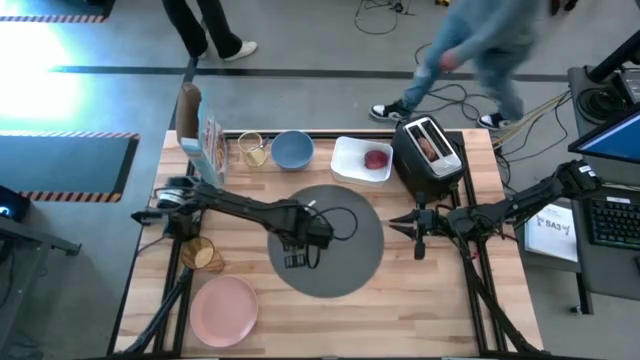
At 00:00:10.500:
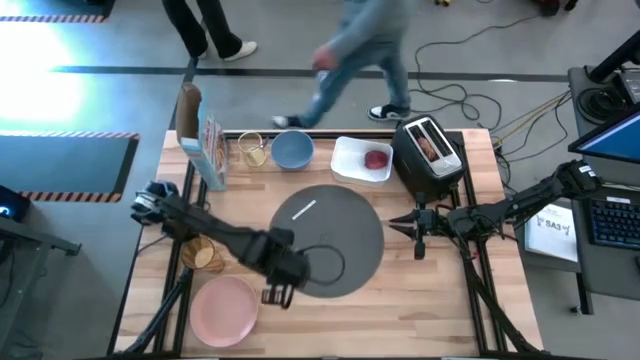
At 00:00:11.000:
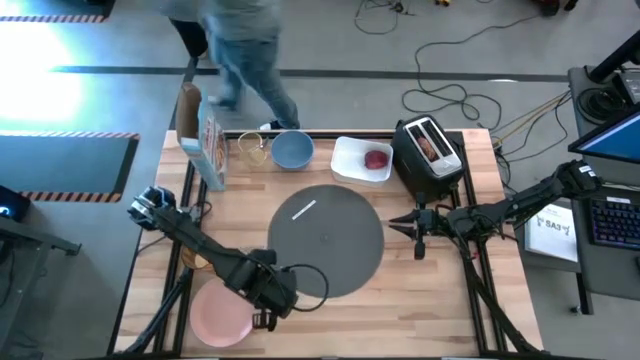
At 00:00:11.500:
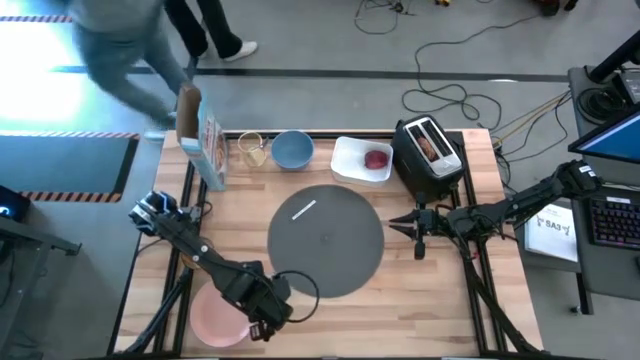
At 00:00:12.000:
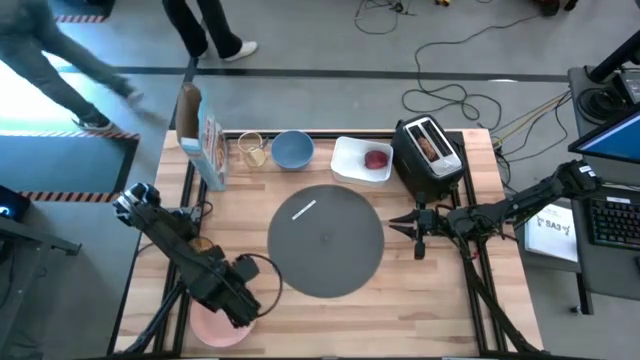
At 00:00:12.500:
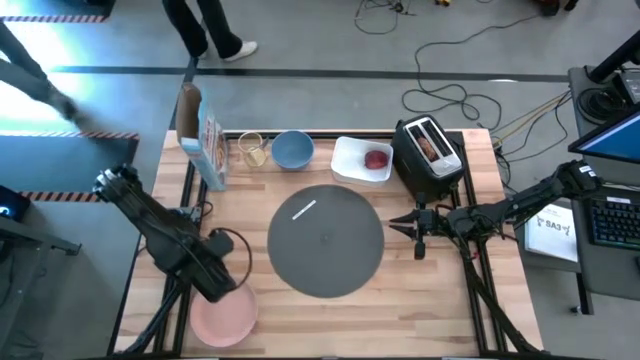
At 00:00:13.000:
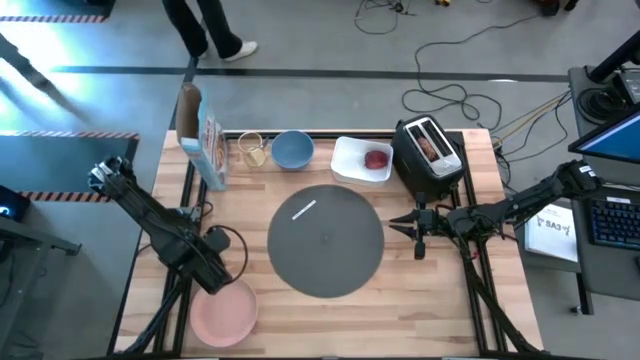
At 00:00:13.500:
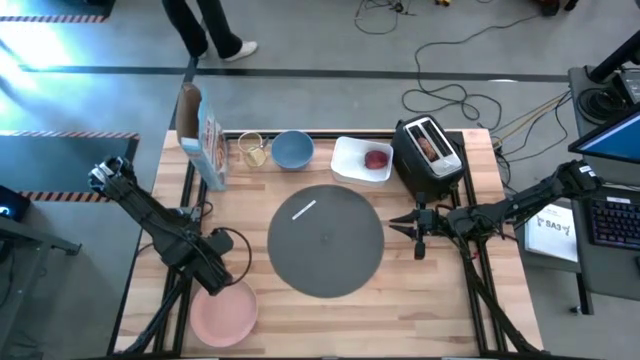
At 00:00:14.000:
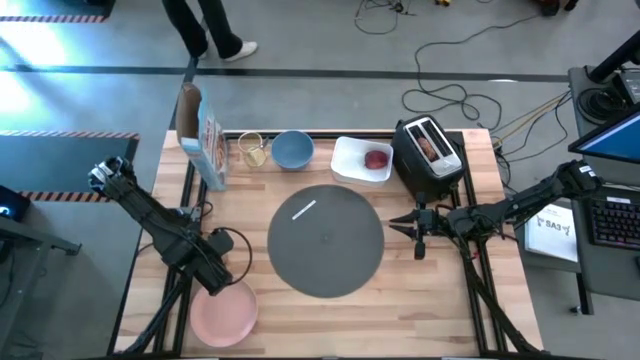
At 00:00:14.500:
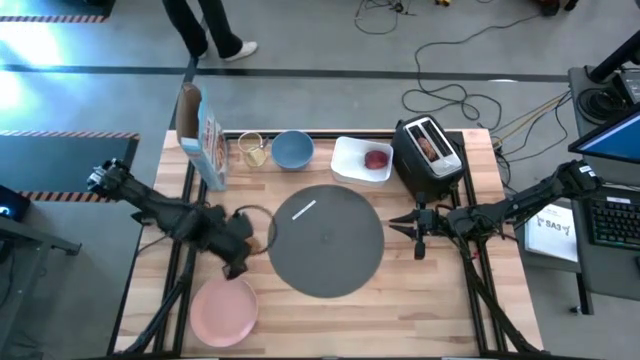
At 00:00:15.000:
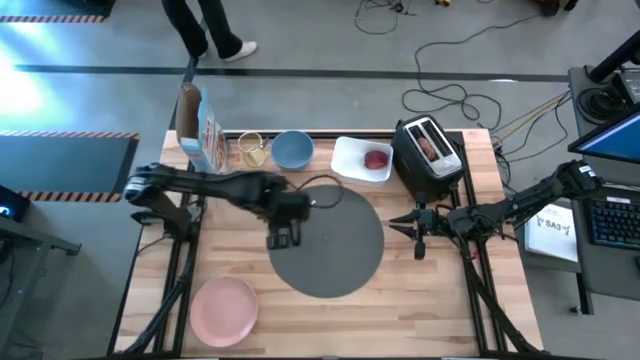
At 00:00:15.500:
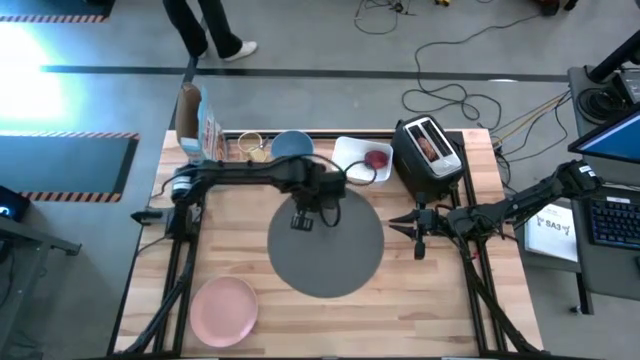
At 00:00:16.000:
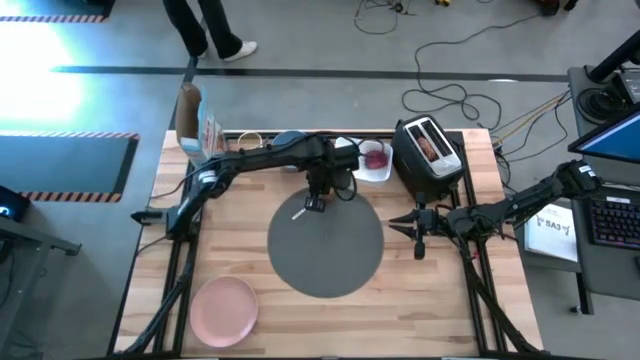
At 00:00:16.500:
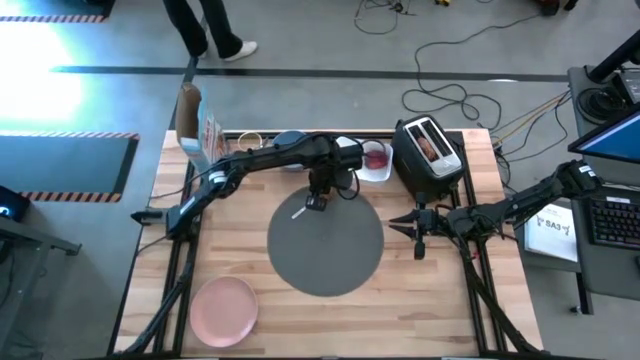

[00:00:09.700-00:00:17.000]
Task: Arrange a breakfast setting
Put the brown glass cup on the placemat

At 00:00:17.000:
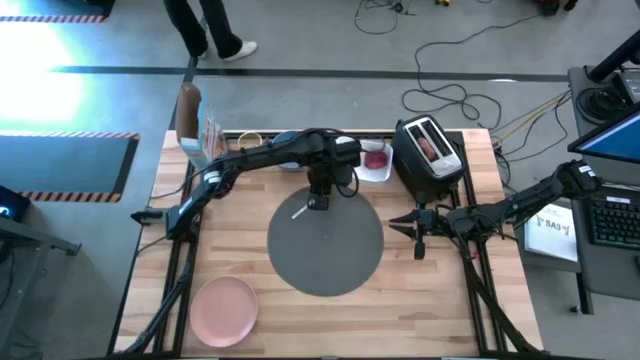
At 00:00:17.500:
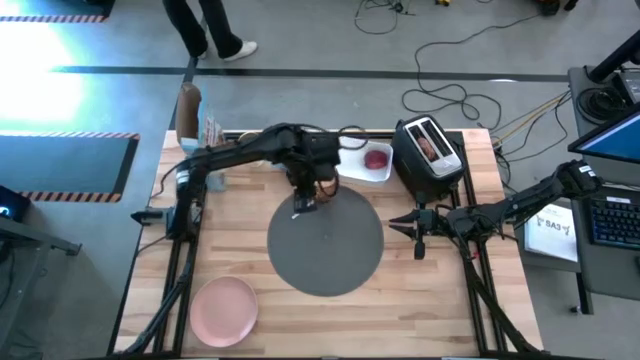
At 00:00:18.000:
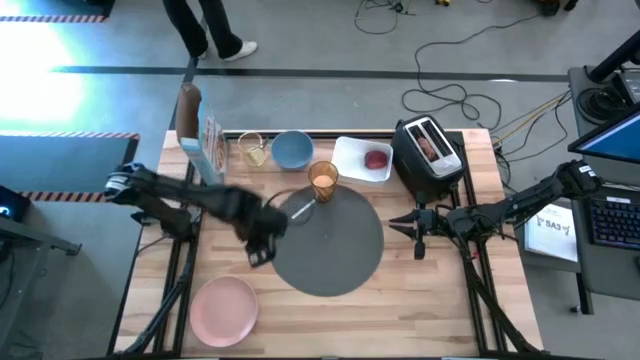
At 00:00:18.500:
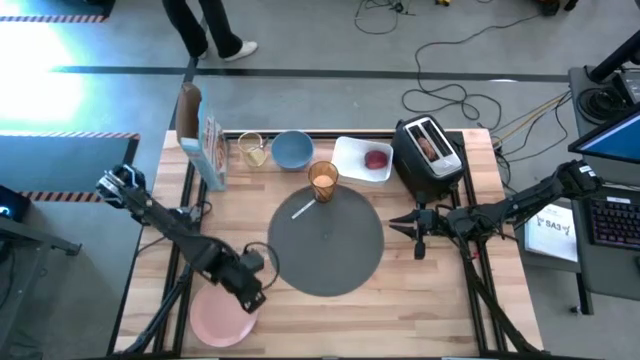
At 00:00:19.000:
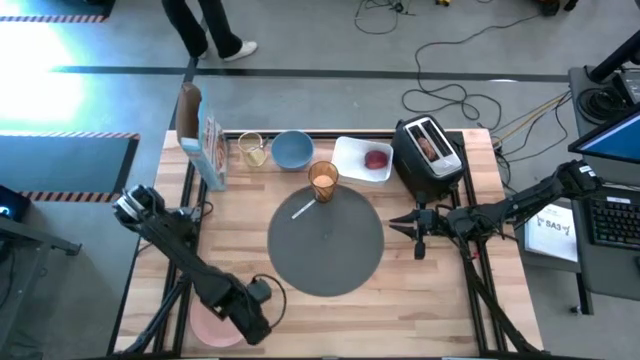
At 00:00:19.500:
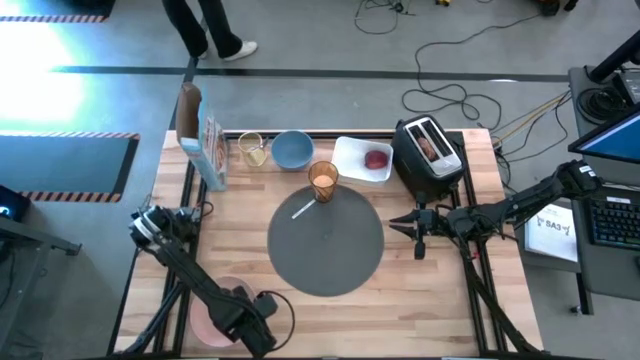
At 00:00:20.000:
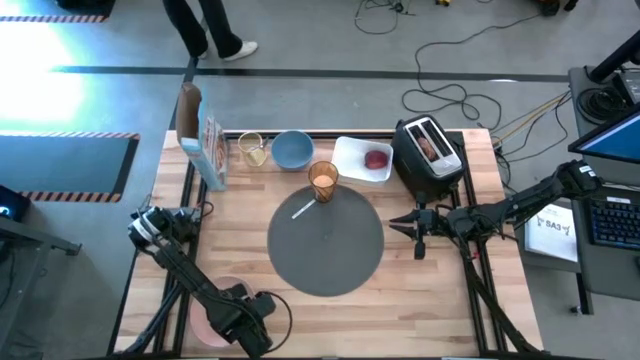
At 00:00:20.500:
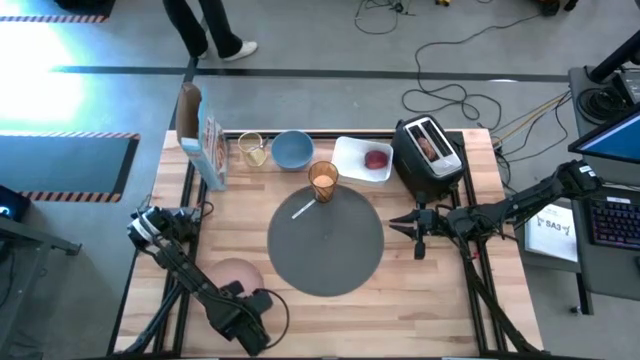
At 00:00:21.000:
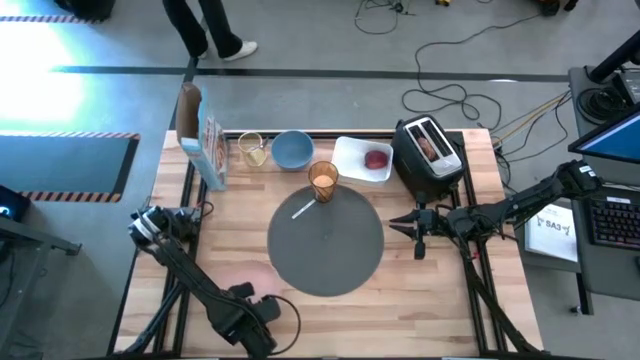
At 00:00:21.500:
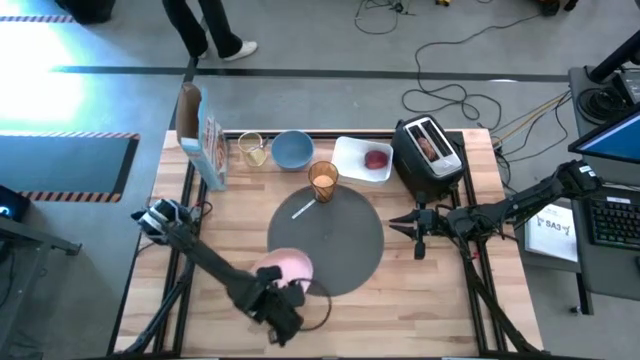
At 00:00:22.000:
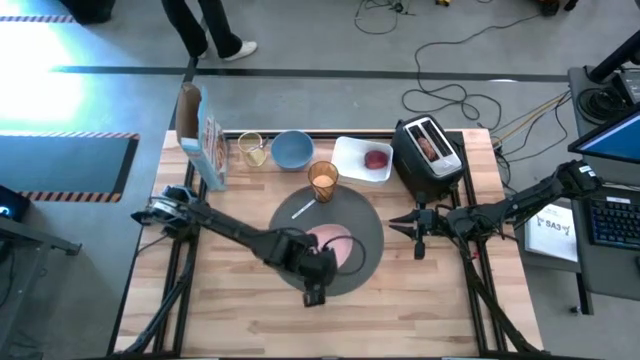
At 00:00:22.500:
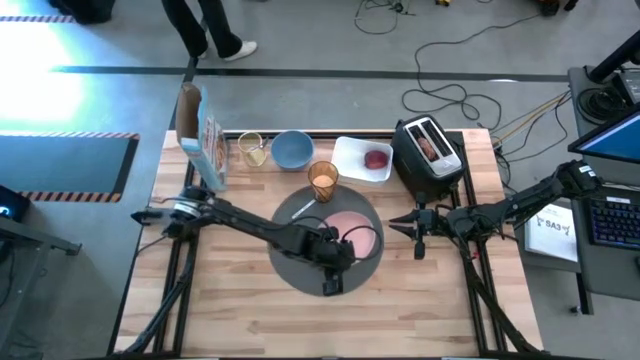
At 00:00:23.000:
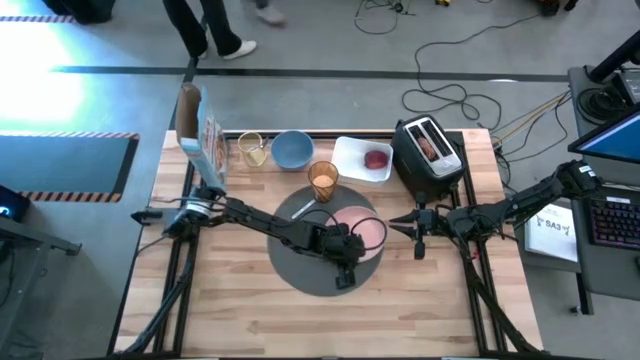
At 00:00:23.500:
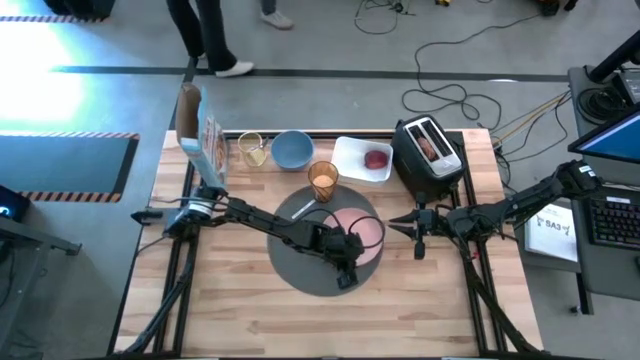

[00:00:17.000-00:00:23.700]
Put the pink plate on the placemat

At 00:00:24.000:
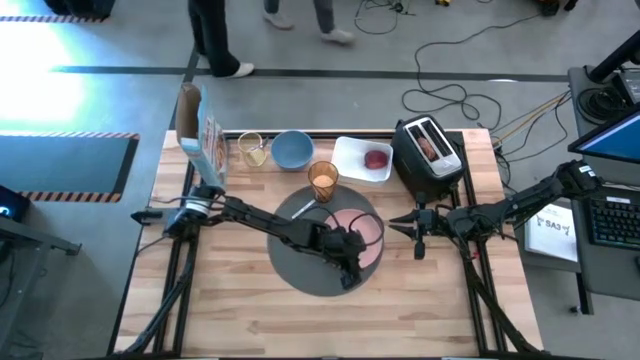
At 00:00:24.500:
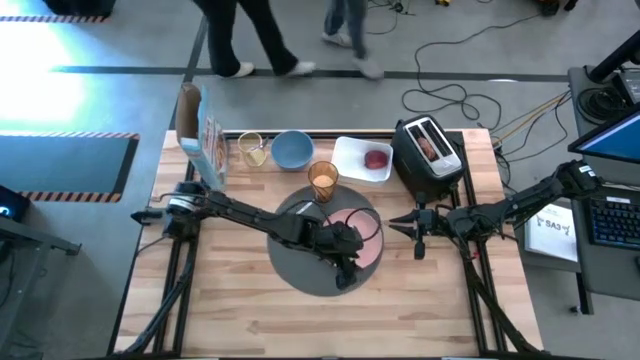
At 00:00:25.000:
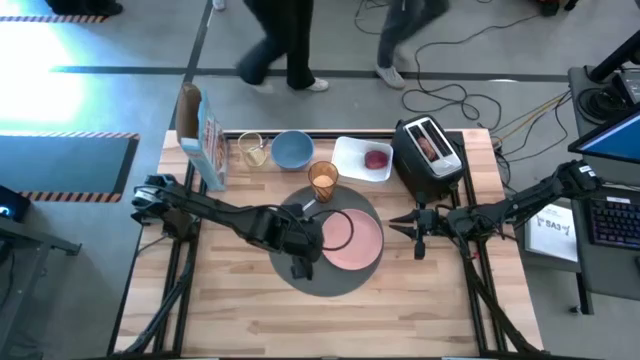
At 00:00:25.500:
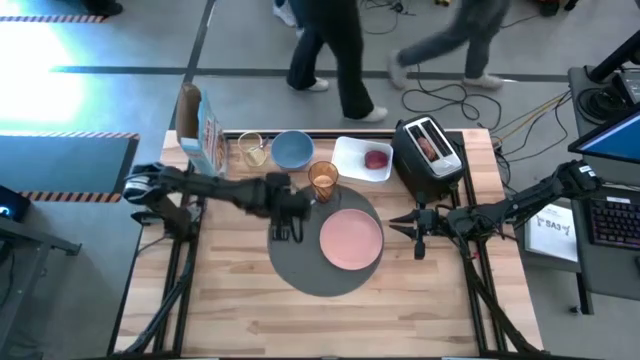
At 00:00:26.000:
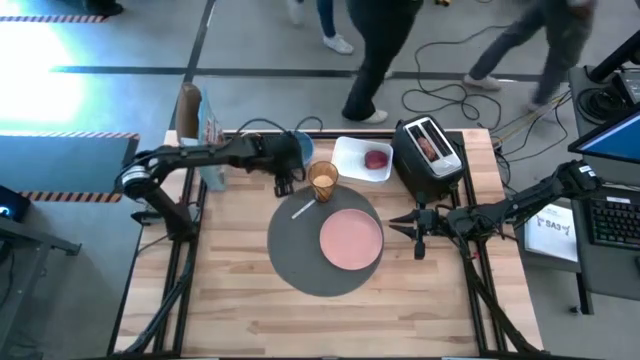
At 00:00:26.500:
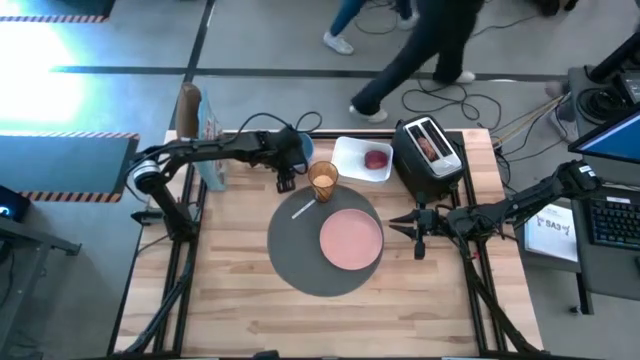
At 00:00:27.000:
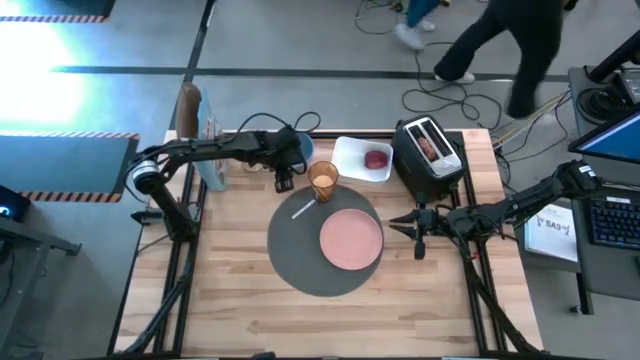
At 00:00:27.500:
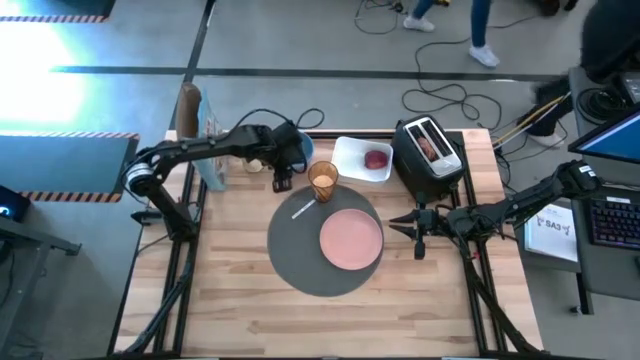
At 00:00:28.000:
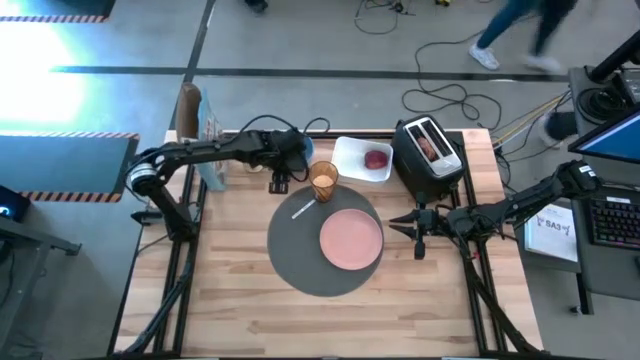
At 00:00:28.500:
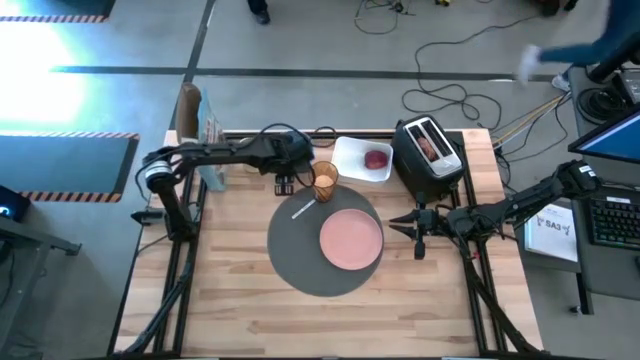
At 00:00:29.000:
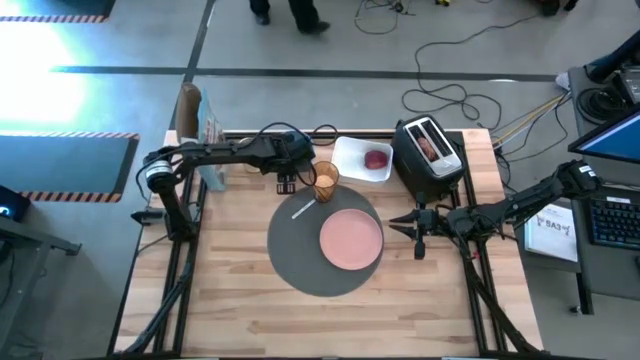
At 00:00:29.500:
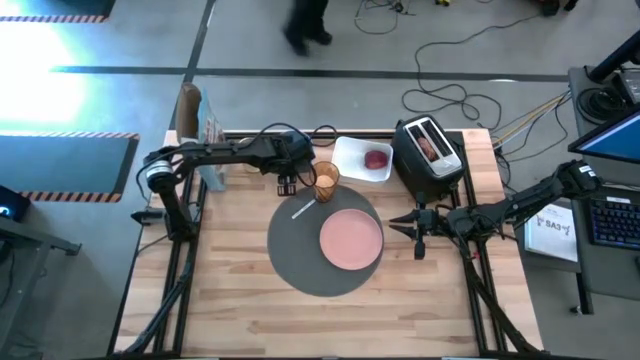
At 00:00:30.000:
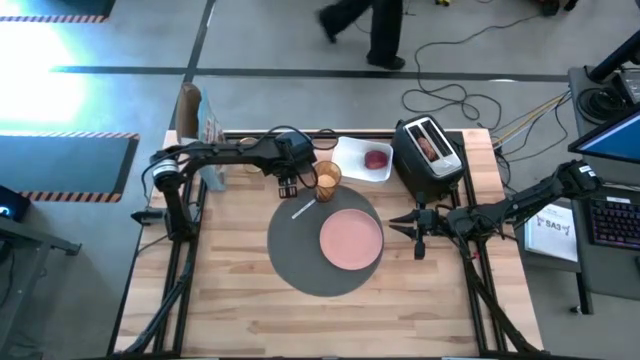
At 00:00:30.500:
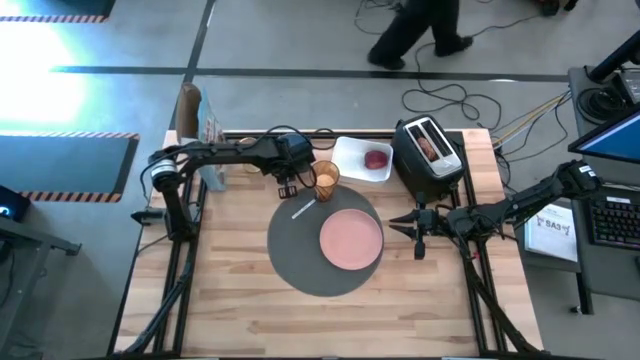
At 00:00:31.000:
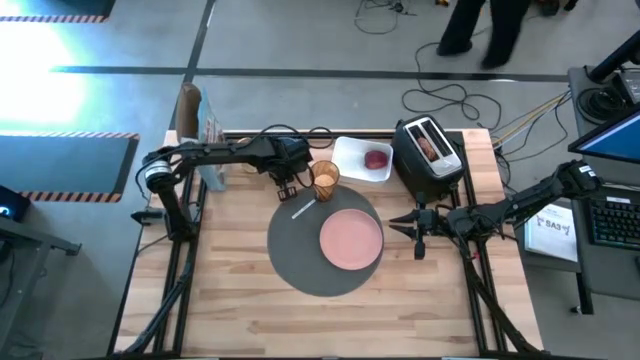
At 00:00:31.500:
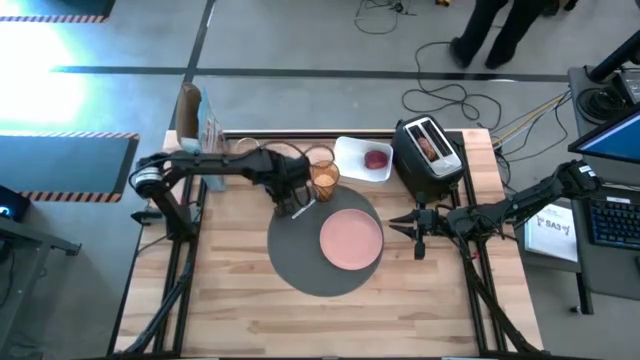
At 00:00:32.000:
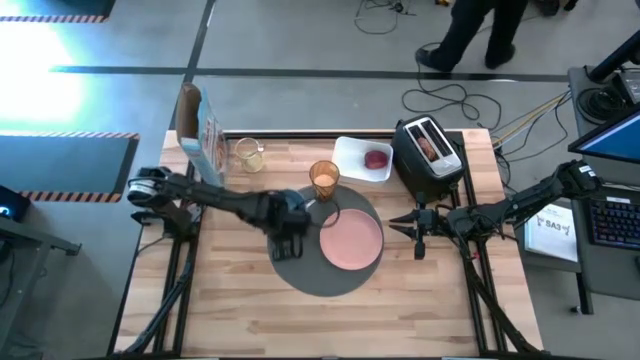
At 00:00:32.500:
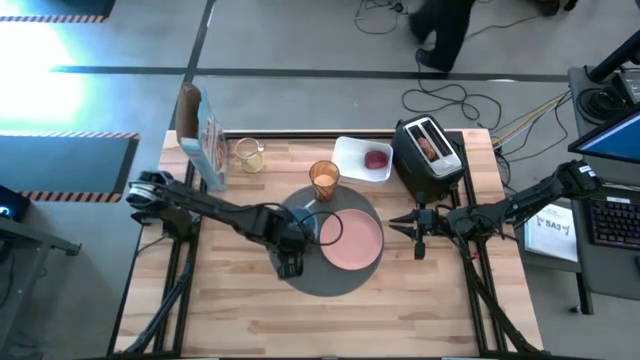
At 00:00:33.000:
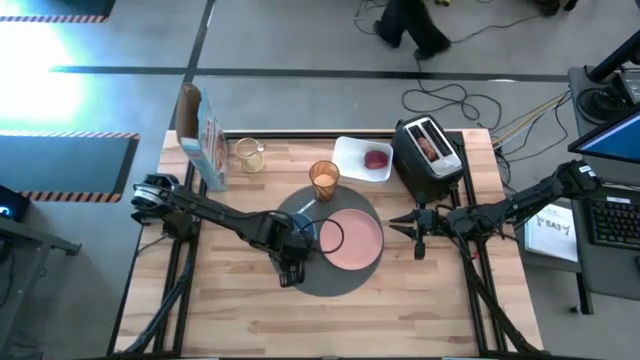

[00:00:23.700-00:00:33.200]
Put the blue bowl on the placemat
